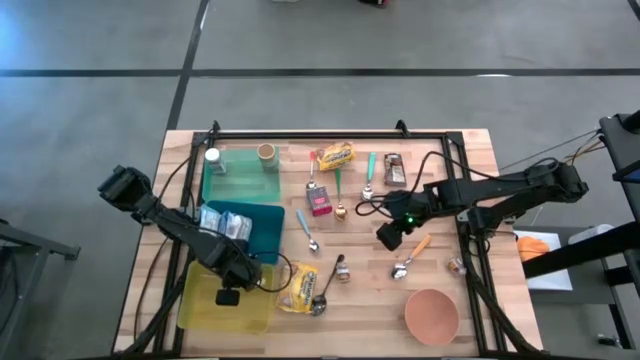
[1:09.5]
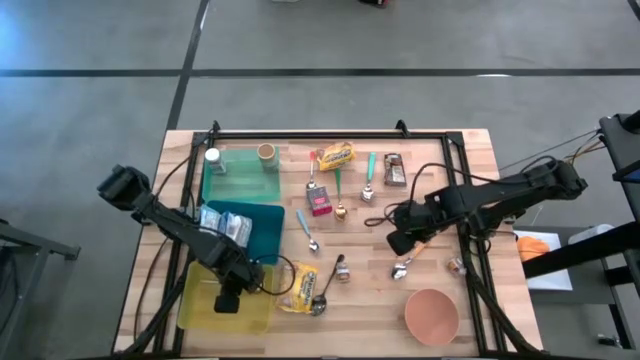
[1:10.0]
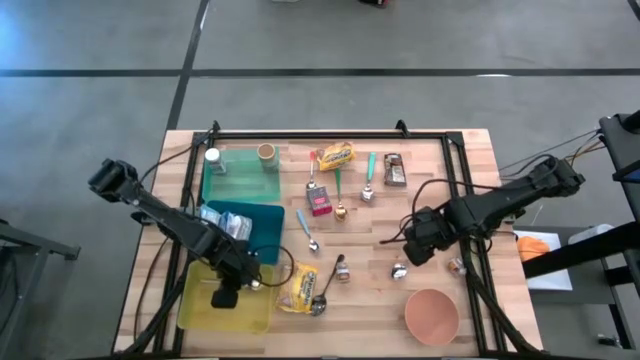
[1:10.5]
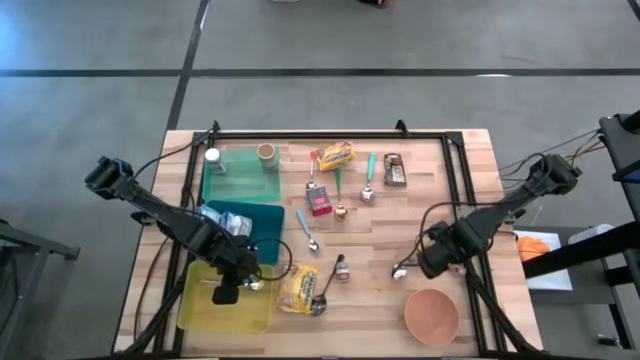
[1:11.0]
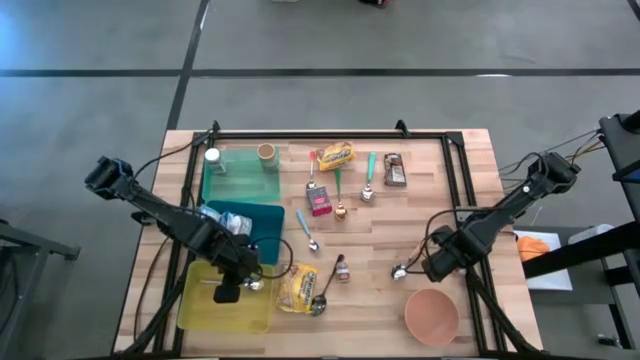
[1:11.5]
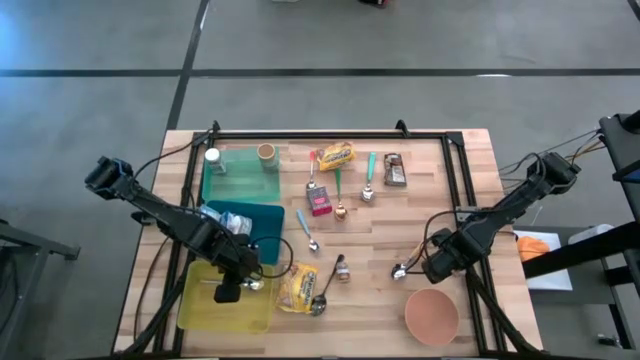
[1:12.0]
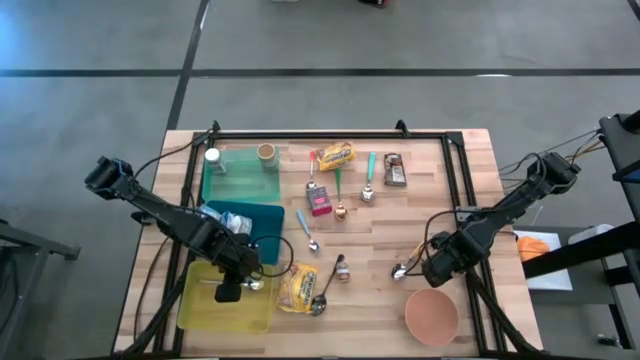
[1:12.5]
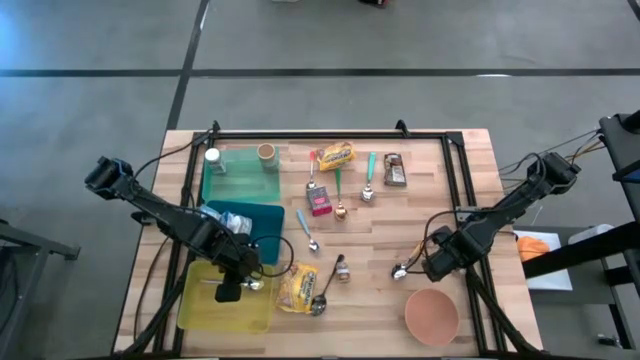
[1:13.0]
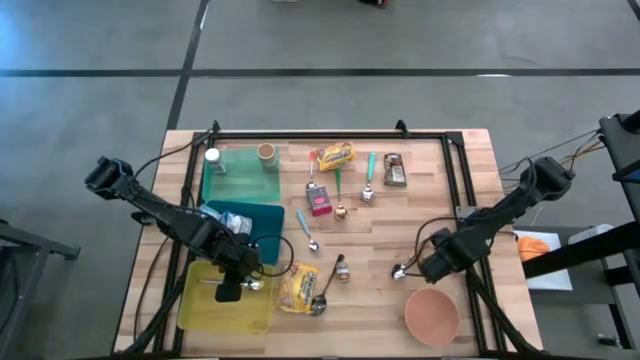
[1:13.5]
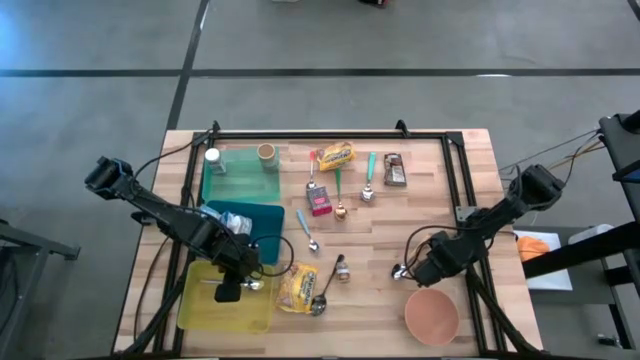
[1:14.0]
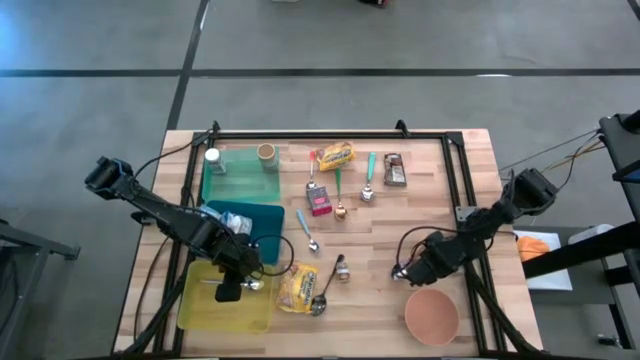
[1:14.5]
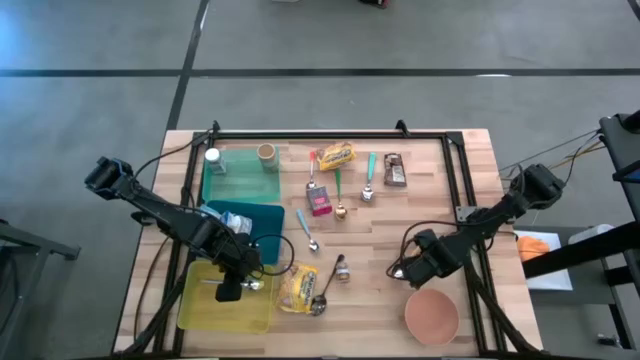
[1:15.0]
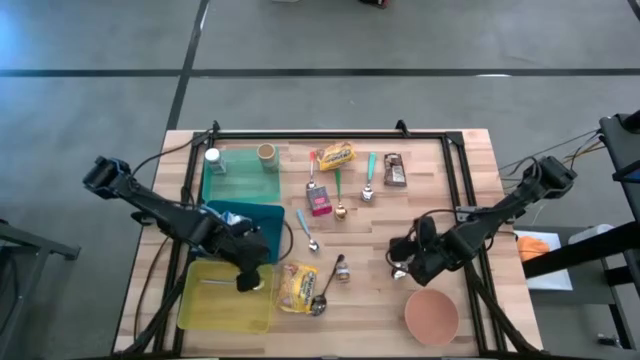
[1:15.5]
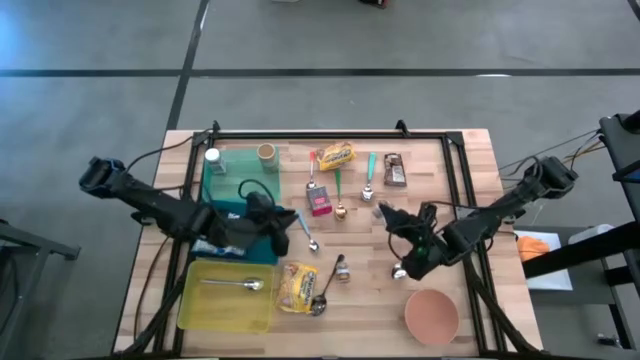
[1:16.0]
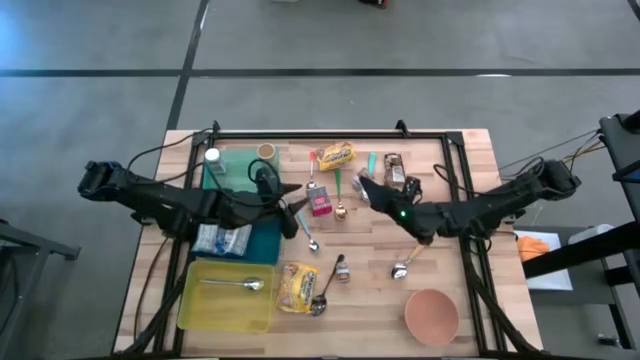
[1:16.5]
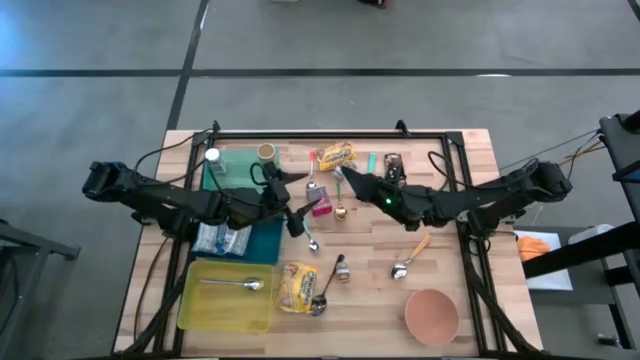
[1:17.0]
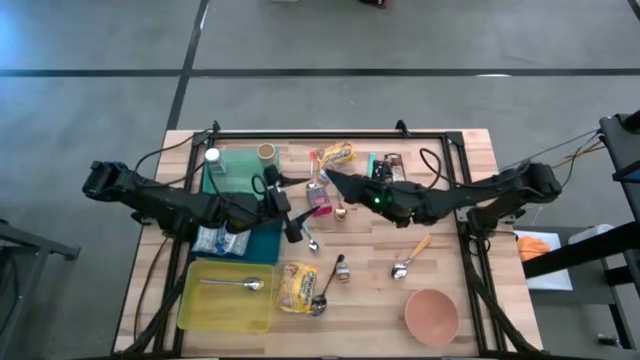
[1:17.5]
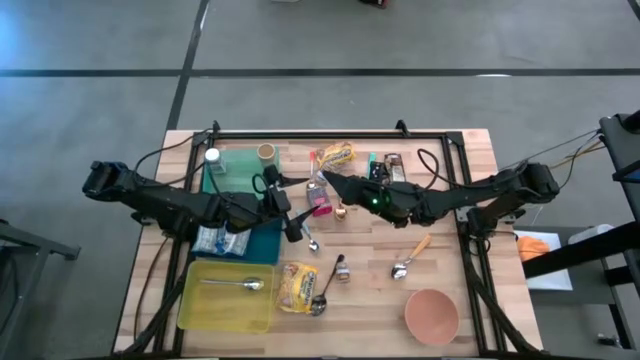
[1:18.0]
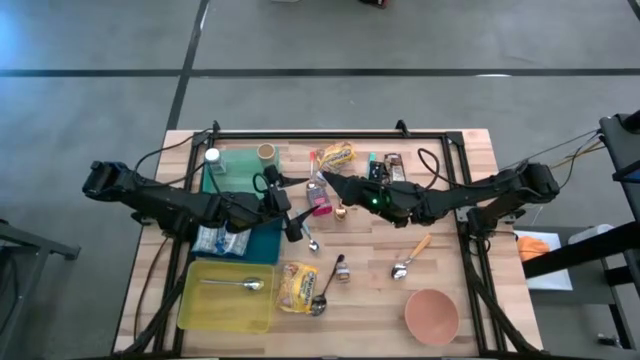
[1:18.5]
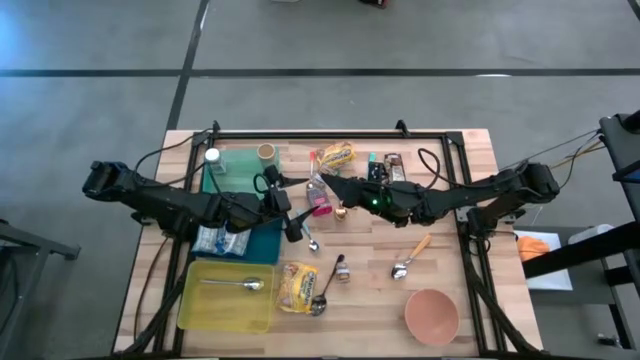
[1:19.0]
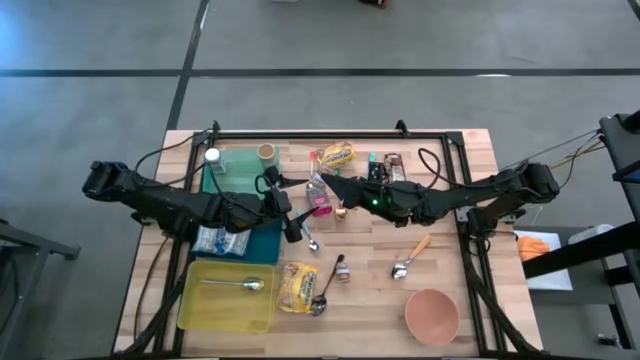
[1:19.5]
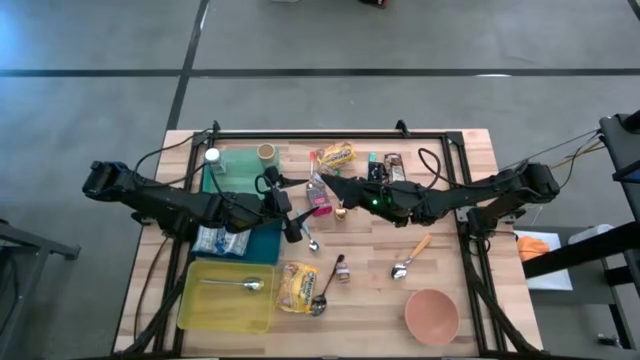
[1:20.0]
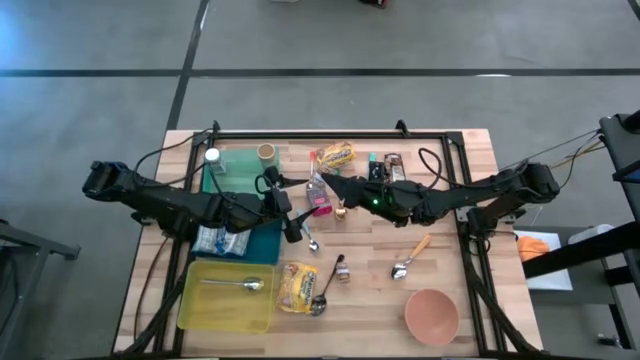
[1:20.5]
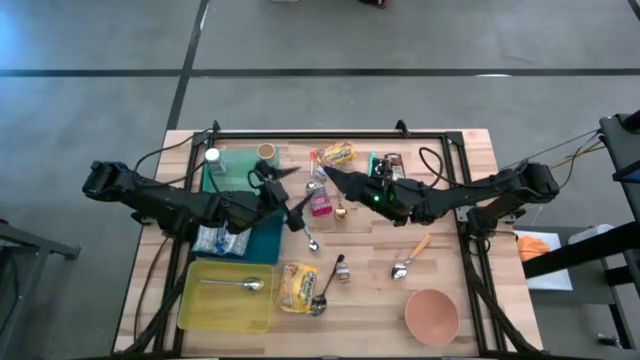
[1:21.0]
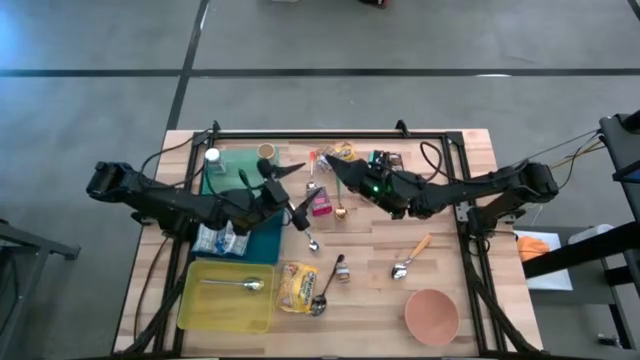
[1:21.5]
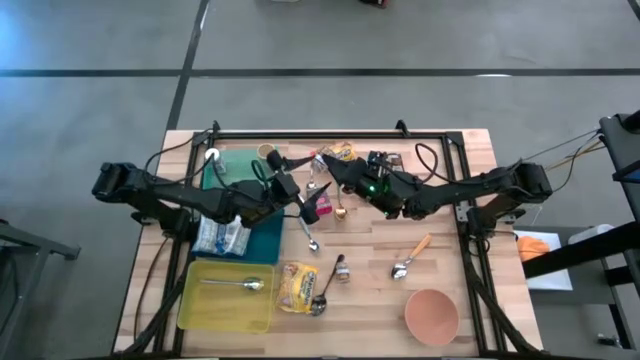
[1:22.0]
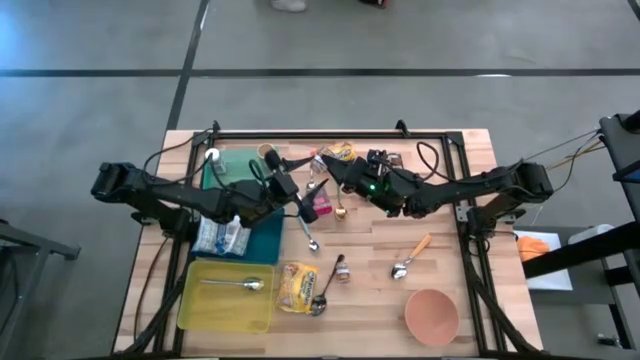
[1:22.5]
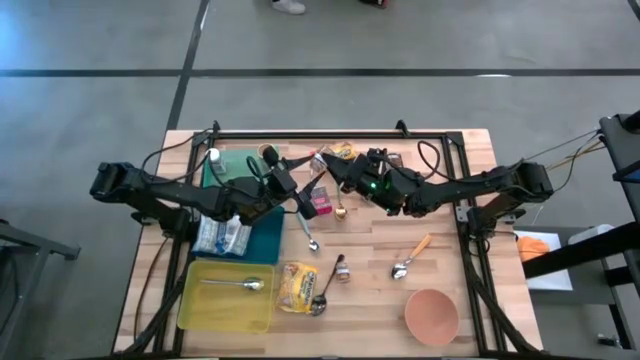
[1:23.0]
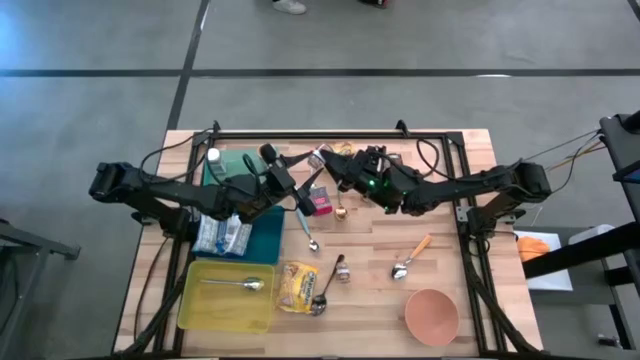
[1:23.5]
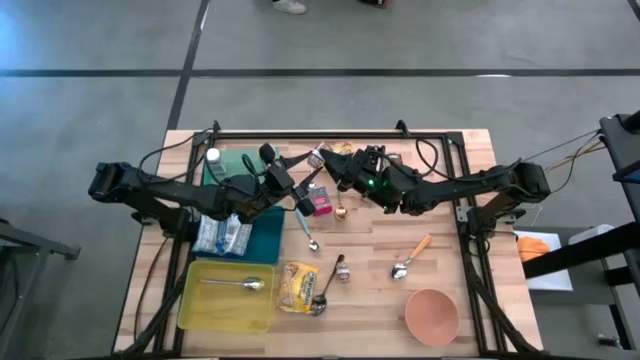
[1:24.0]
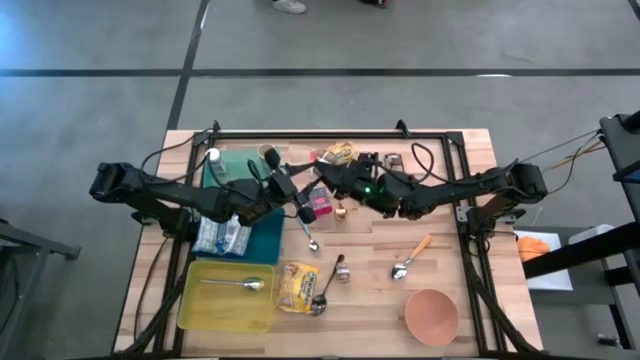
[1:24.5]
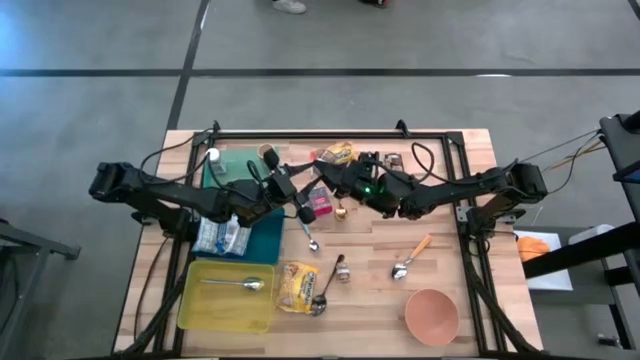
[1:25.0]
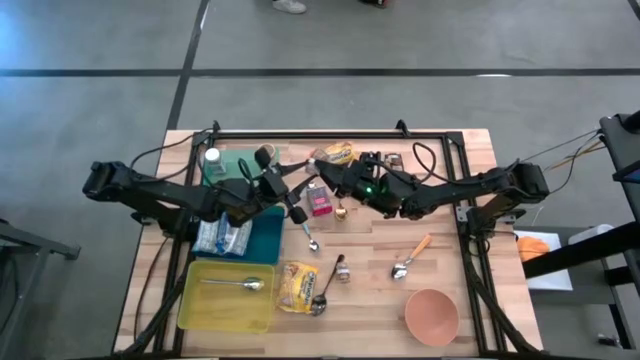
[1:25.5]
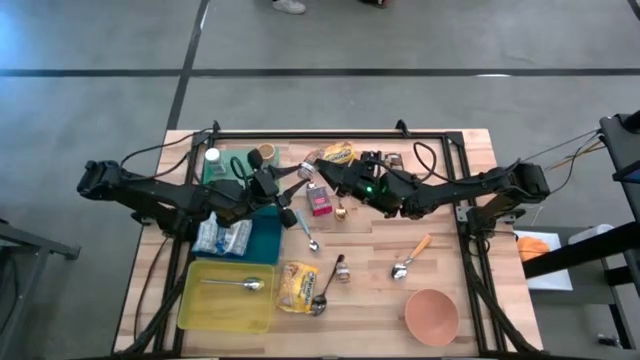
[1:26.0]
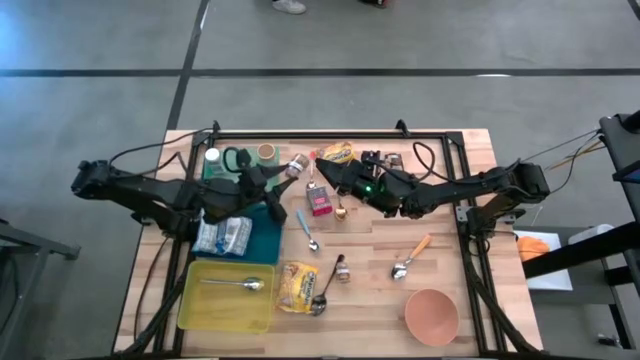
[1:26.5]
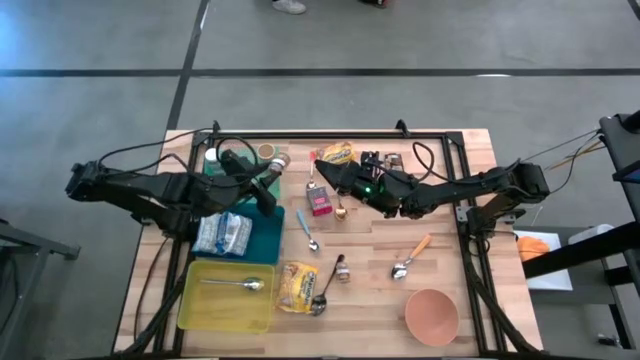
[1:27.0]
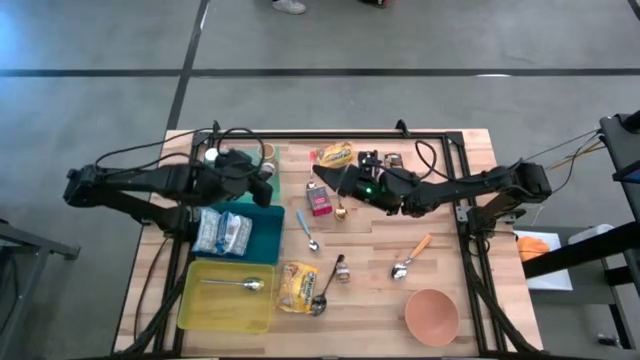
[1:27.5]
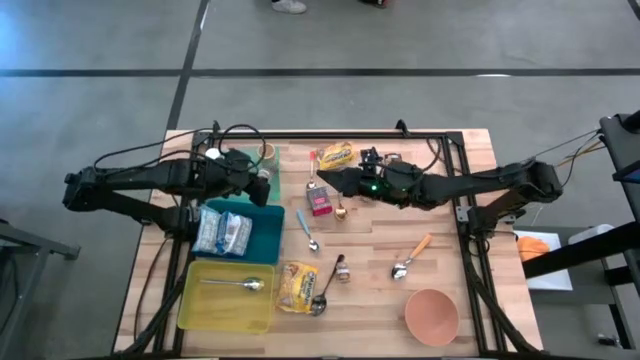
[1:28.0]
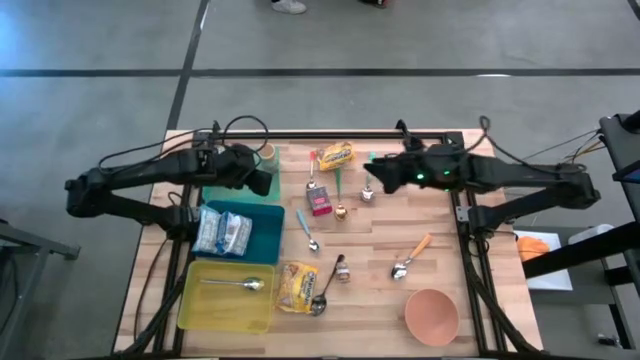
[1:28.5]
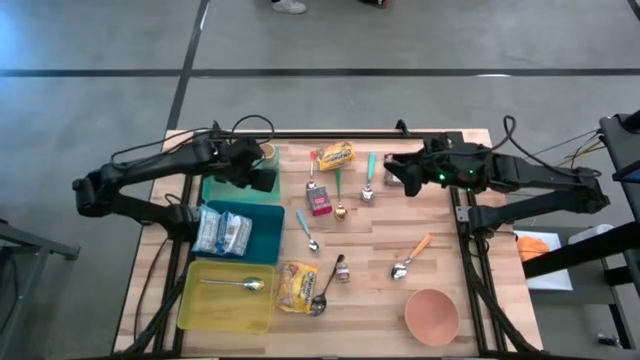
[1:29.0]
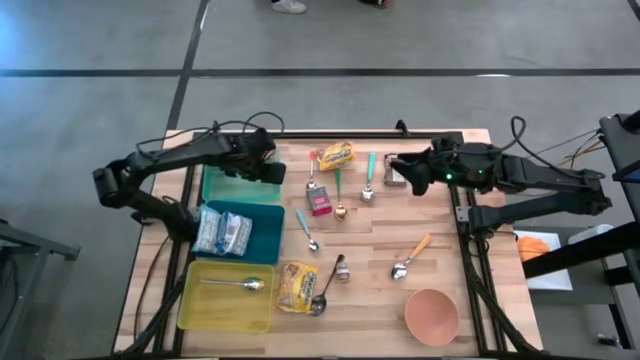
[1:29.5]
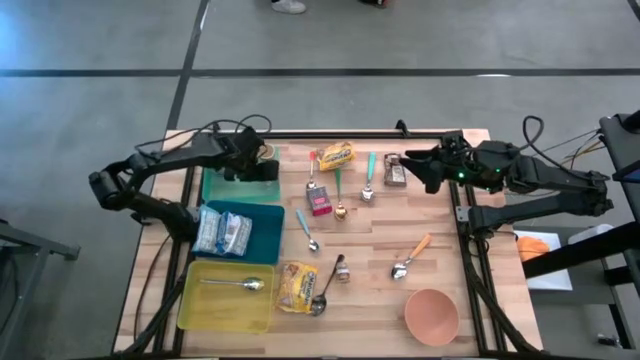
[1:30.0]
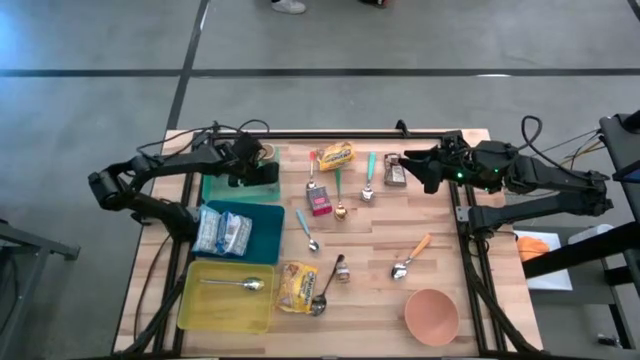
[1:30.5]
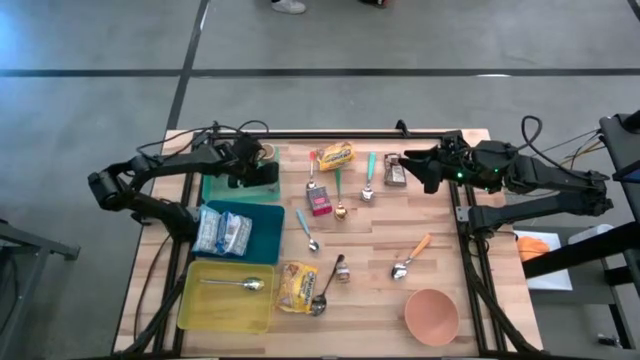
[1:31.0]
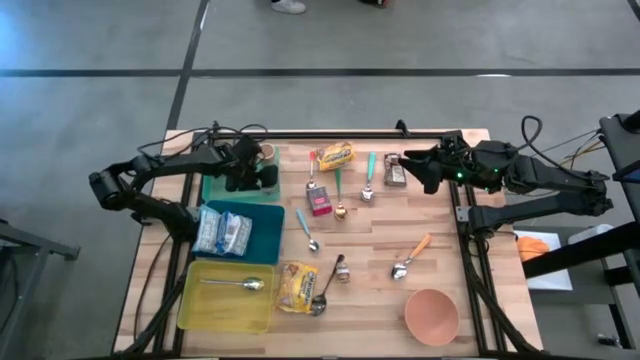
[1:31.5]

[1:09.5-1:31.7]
Put the right brown seasoning bottle into the light blue bin
